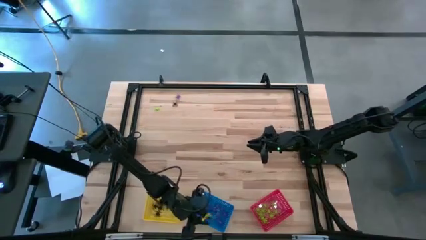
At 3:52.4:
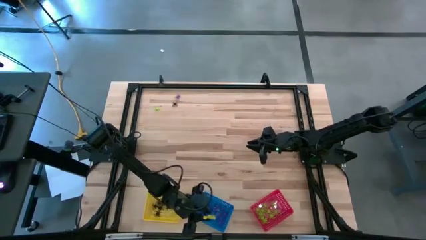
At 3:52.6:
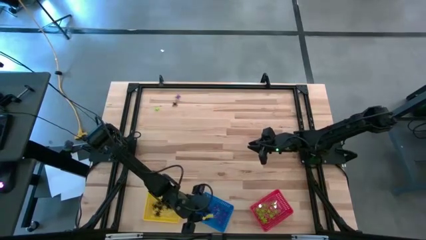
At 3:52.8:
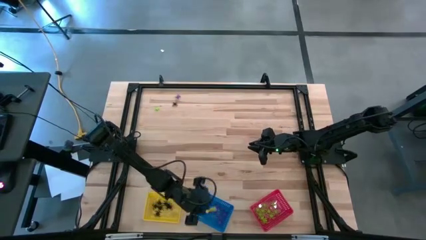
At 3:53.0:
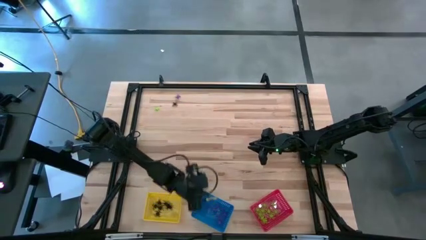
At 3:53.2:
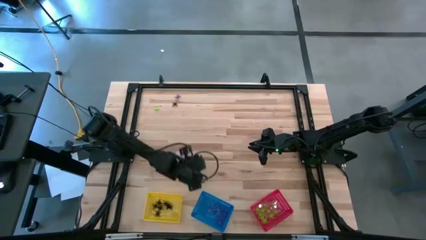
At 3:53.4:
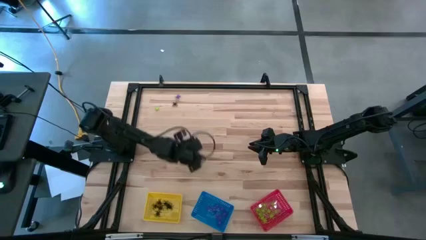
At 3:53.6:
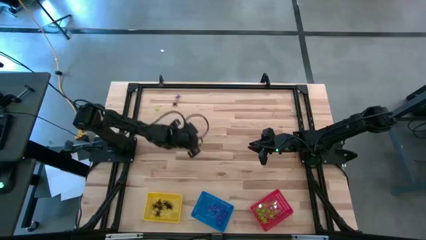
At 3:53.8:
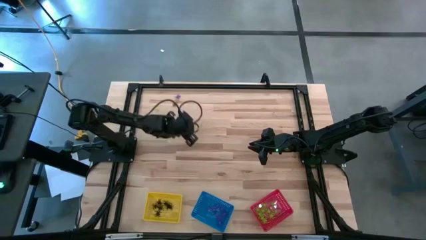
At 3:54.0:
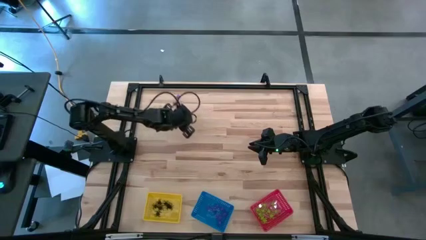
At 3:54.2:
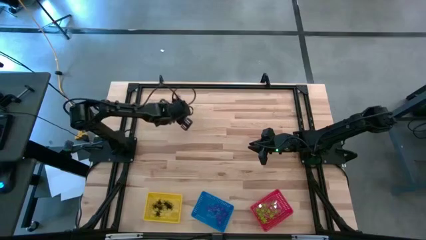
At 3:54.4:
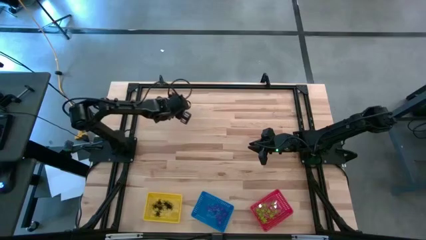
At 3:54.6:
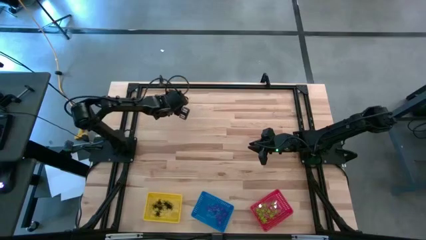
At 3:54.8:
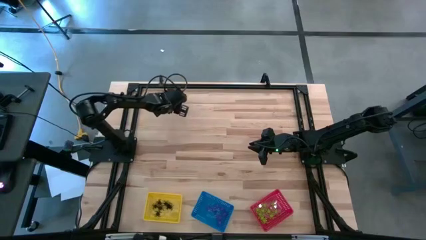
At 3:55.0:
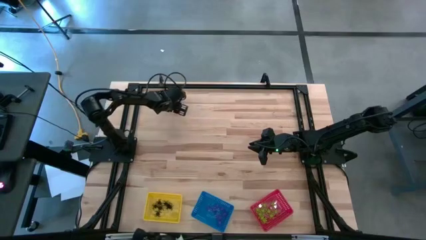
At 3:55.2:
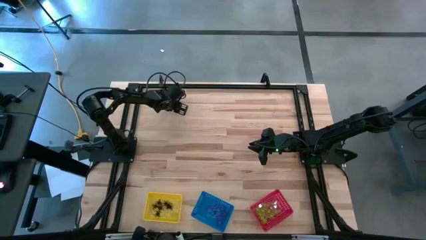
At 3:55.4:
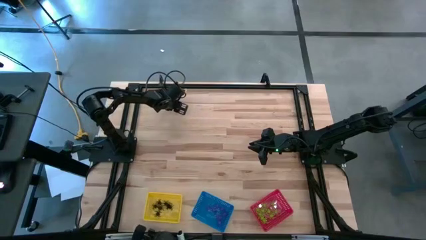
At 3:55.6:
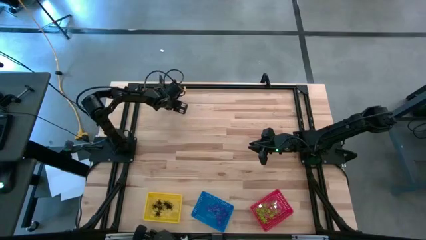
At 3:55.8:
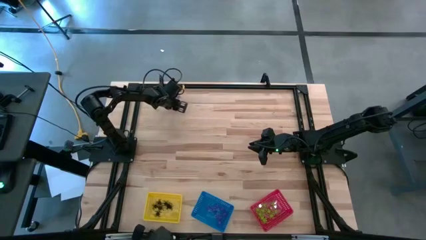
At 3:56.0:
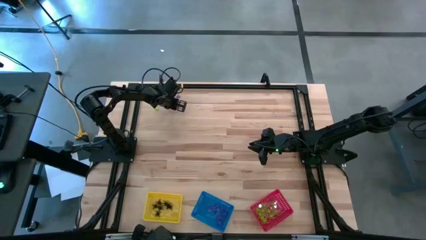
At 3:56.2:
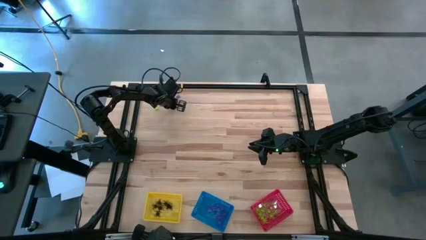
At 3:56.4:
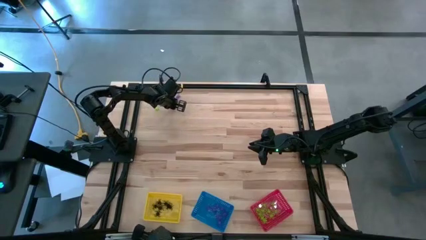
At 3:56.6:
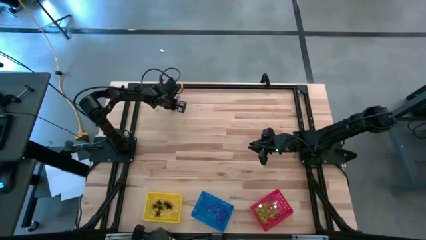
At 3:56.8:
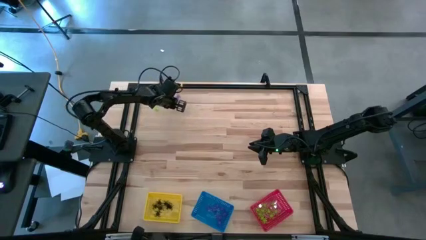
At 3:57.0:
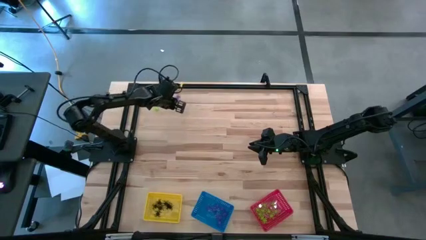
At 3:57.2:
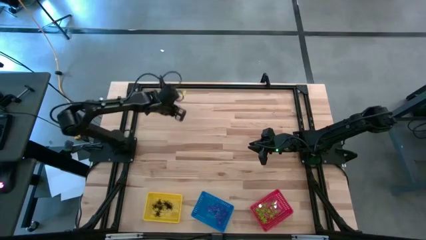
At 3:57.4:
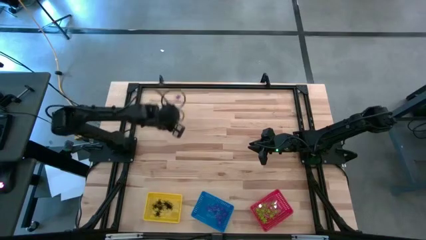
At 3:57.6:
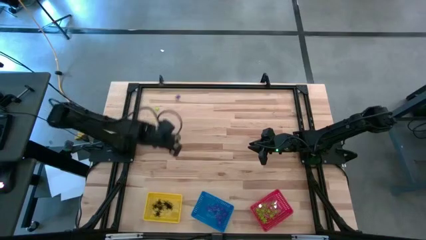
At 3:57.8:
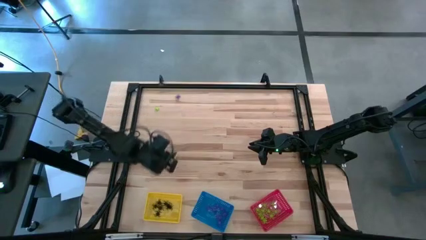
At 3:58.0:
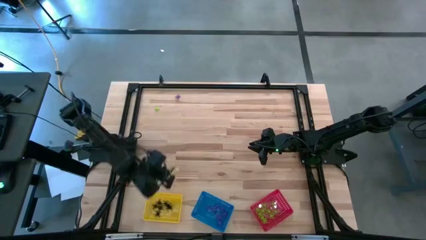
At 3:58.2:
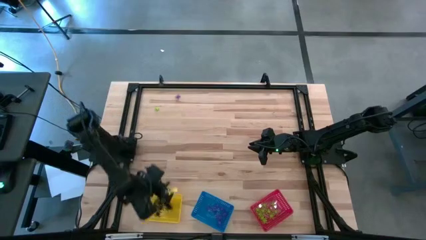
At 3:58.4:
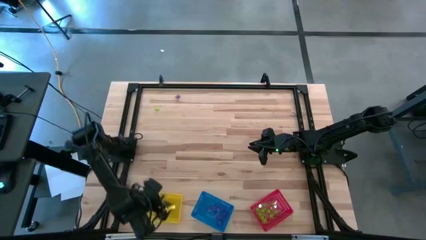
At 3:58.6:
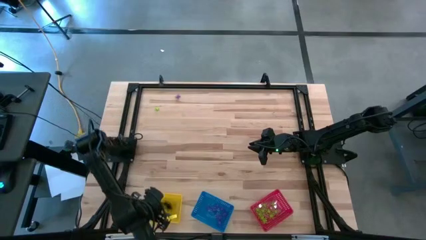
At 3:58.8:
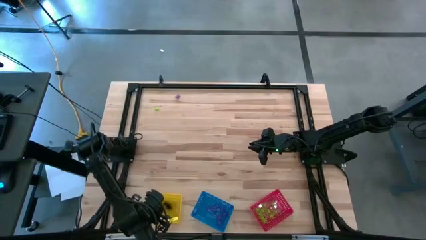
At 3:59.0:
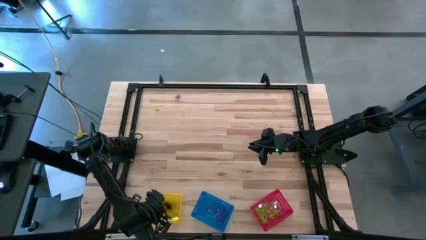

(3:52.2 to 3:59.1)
Task: Sort Halloween decoration
Put the black spider toy into the yellow bin

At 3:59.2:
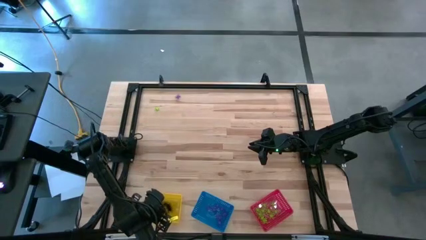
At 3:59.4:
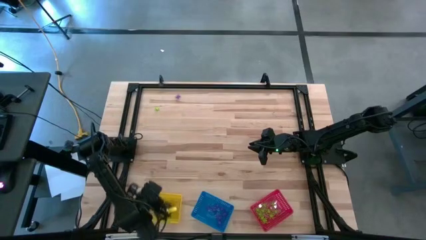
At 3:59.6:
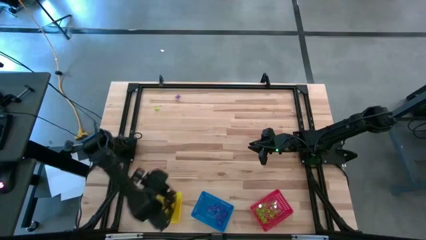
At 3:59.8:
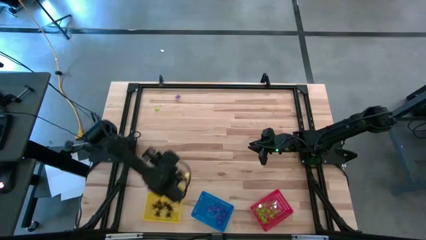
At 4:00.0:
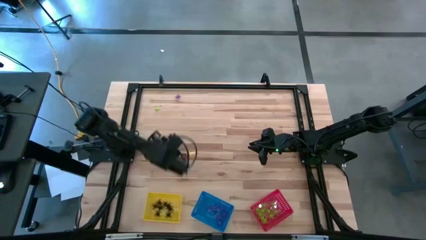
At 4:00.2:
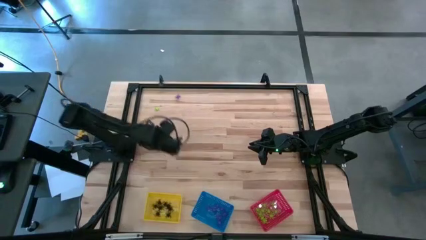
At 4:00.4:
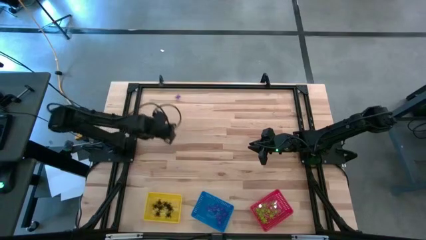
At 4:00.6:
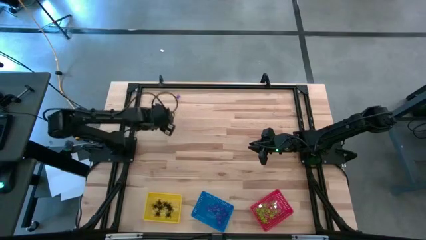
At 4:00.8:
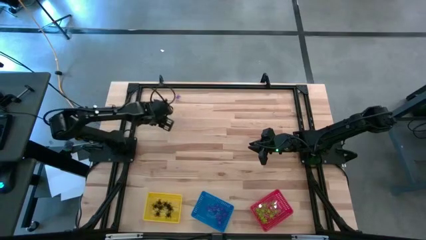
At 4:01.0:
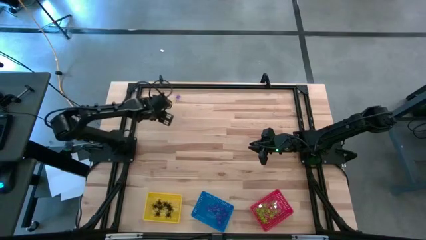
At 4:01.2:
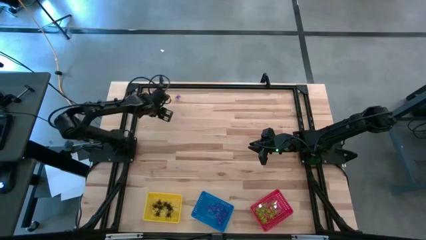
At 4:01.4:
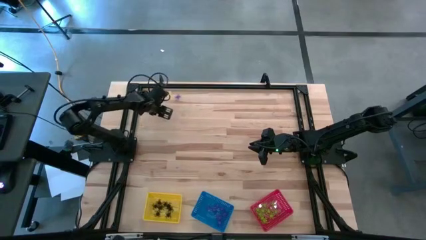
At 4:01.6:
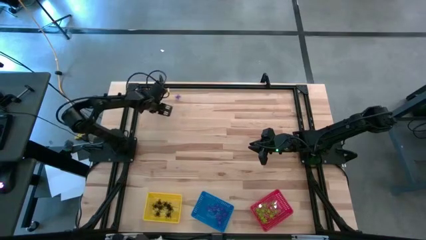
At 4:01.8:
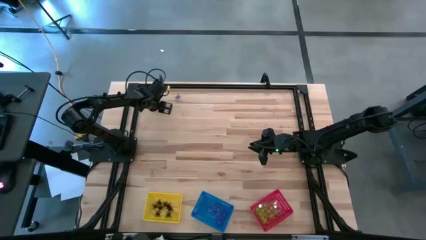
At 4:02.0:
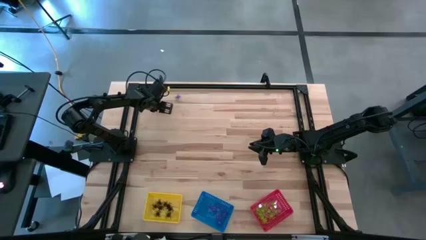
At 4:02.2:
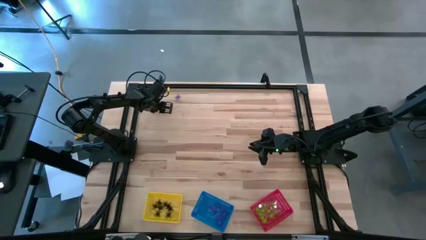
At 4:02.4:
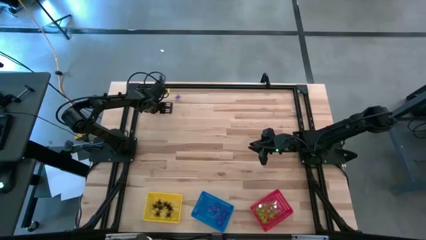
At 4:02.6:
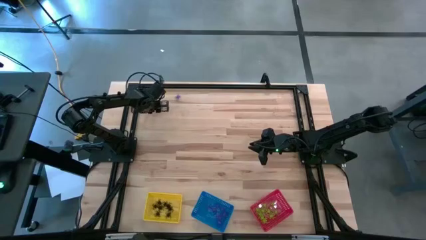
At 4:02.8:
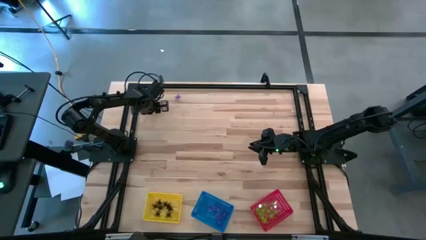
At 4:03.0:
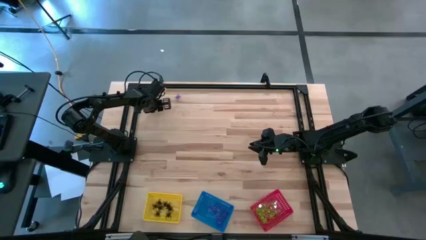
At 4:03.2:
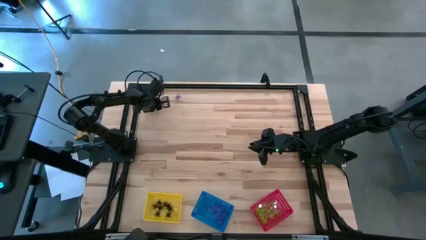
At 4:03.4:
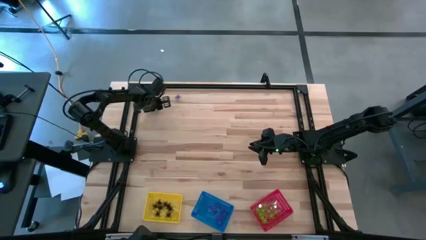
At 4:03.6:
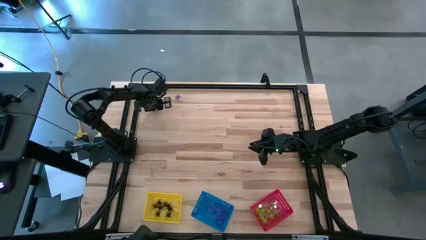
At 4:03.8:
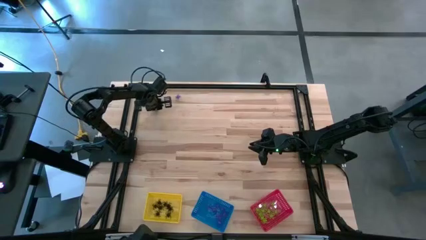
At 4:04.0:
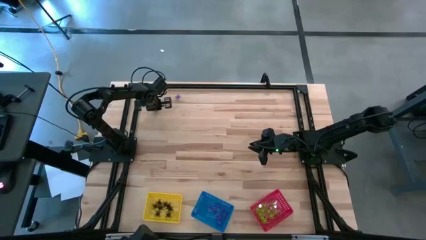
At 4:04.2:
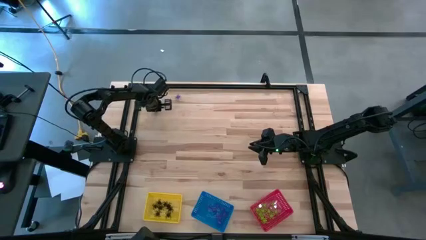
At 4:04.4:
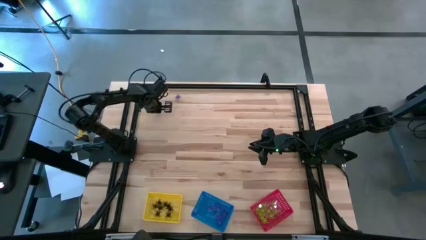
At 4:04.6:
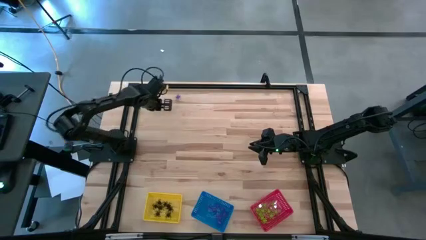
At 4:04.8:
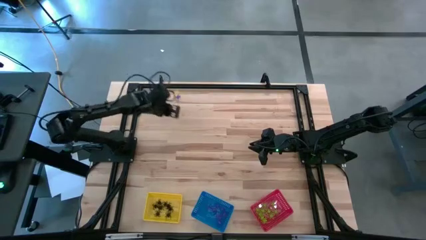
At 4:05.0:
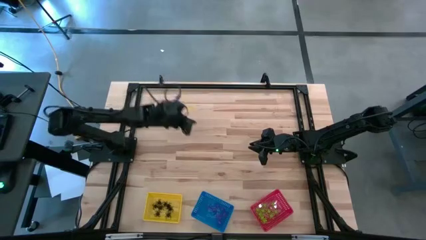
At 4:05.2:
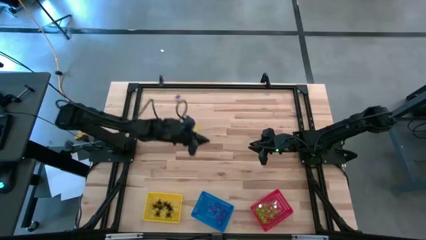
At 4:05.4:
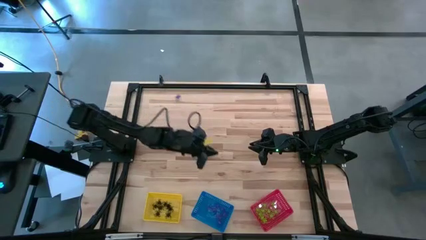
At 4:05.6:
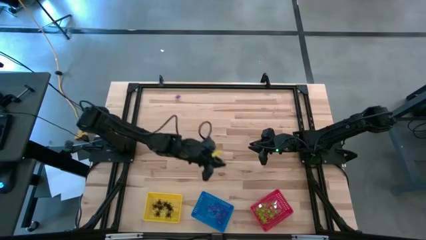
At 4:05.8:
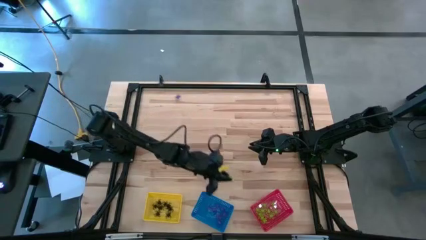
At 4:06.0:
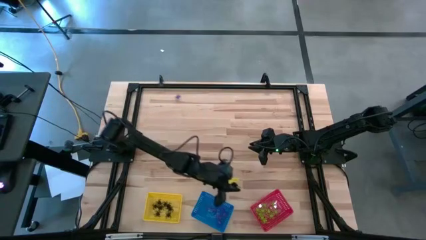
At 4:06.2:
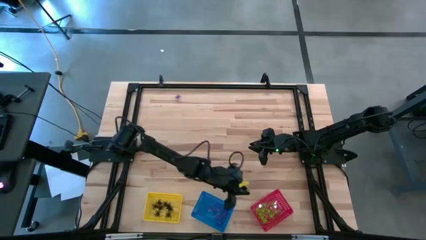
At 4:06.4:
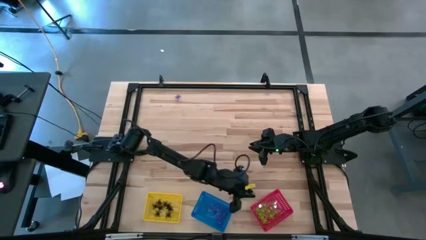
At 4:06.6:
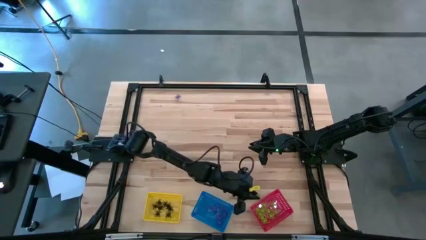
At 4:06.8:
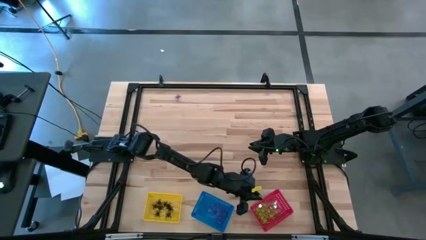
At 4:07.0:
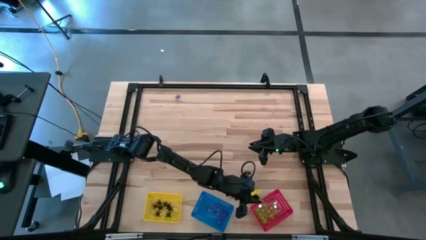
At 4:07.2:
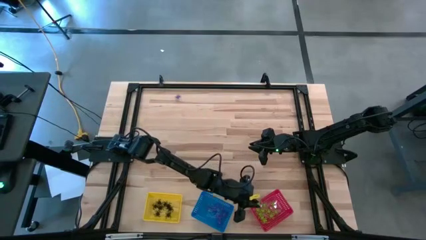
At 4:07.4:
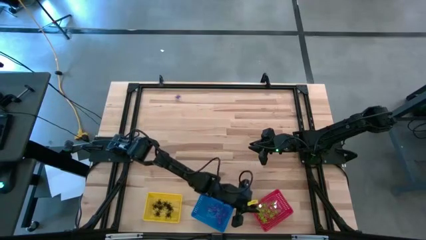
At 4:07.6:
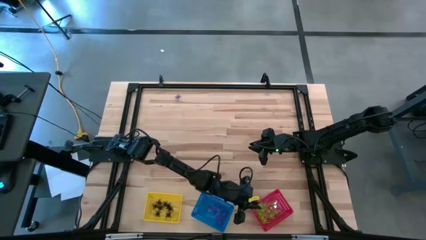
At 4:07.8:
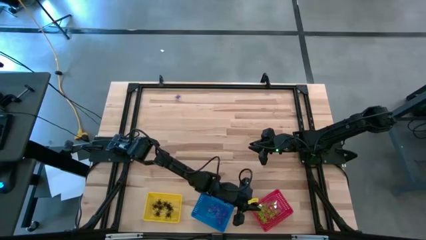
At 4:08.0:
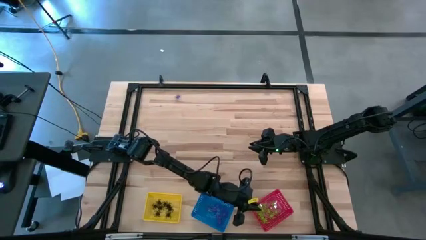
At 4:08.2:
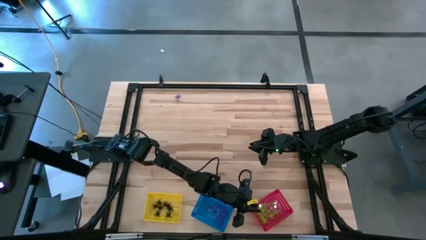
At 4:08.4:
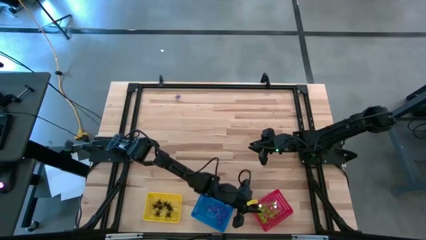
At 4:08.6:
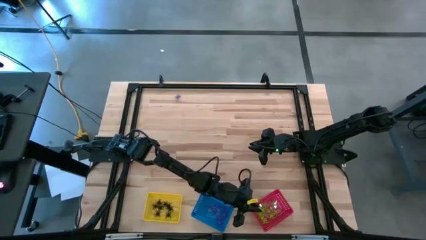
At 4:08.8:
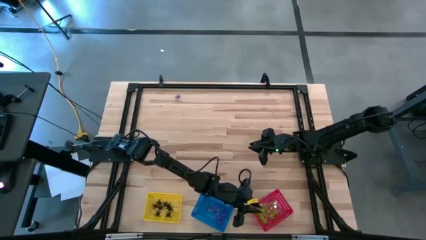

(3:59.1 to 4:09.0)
Put the green spider toy into the red bin
